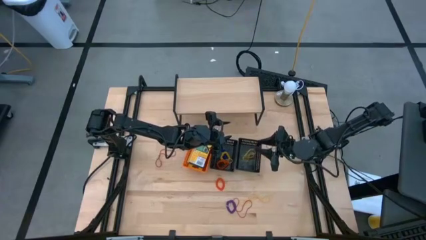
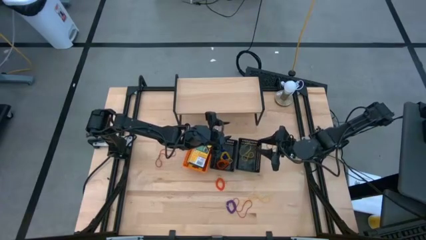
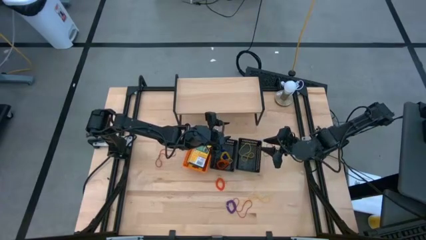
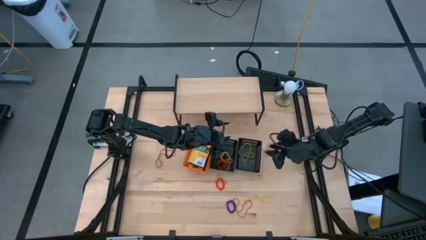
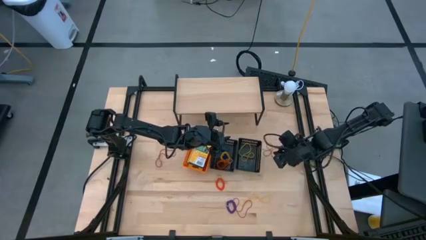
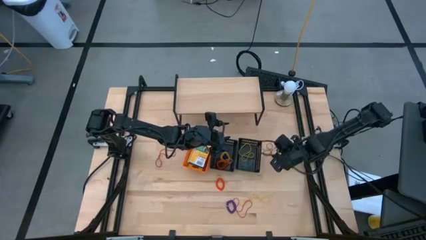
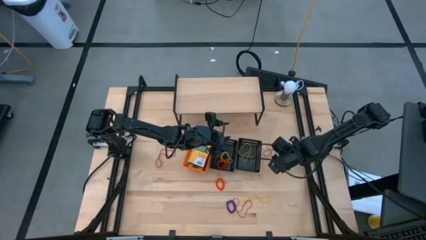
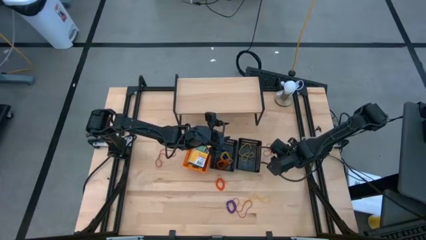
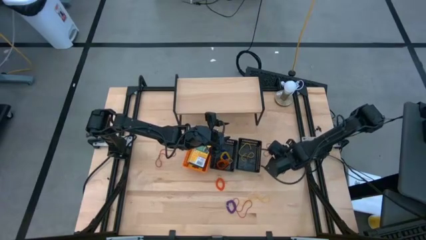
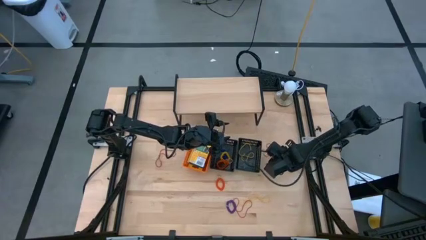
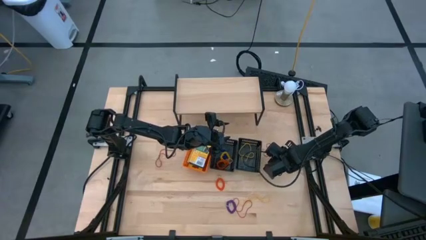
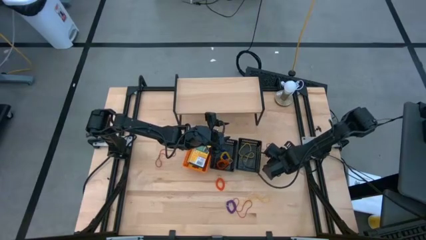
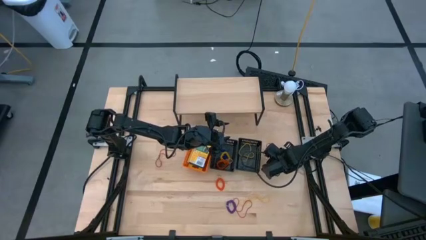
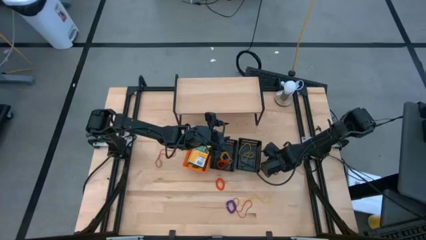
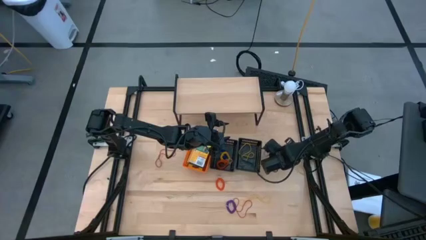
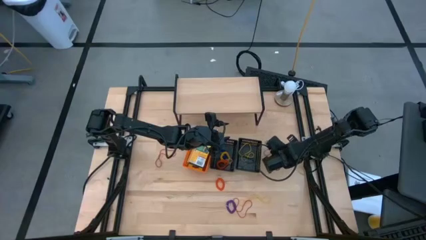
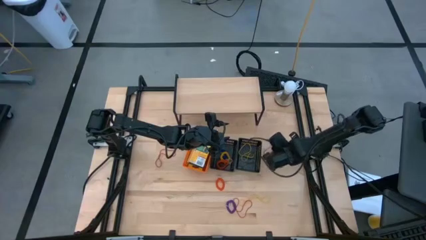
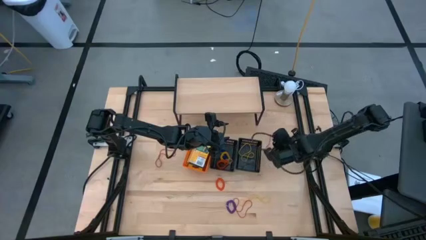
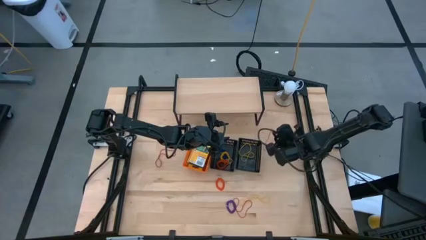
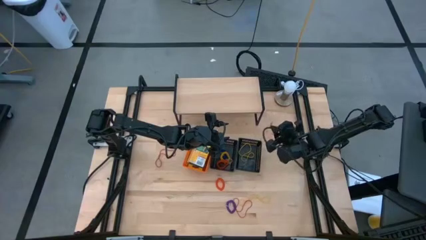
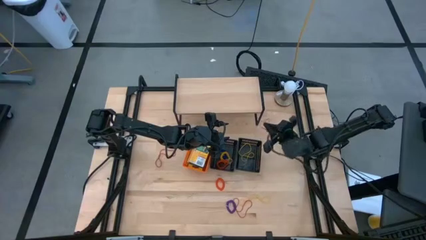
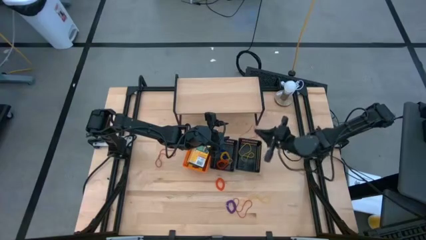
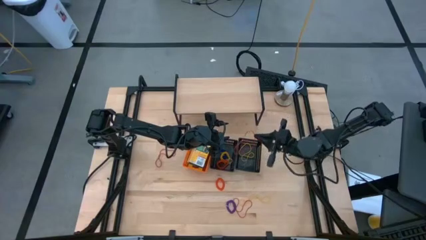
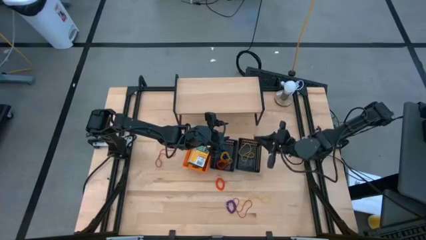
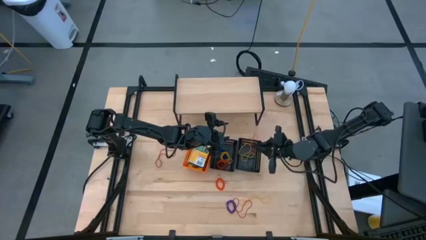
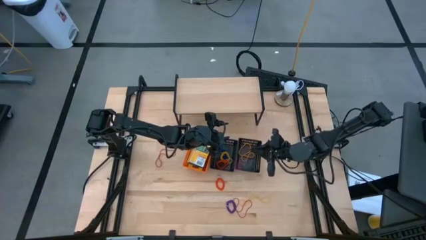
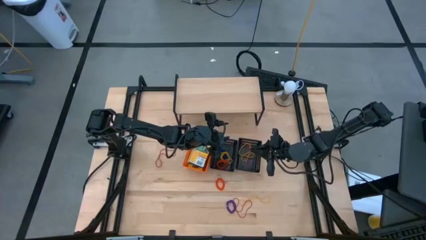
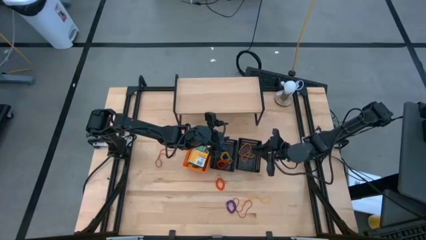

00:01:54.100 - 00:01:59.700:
Task: Pick & Place Office Desk Supplies
Put the red rubber band into the right black bin

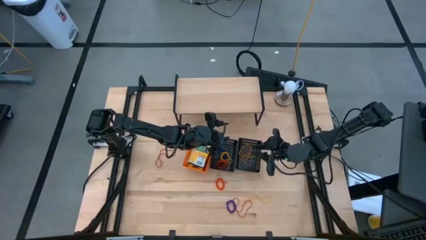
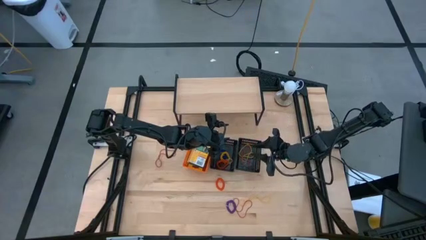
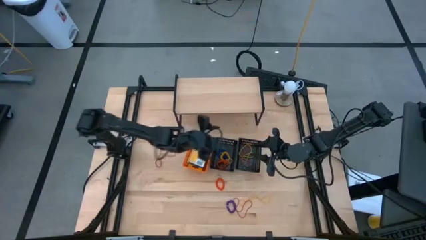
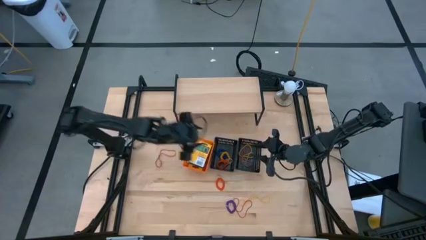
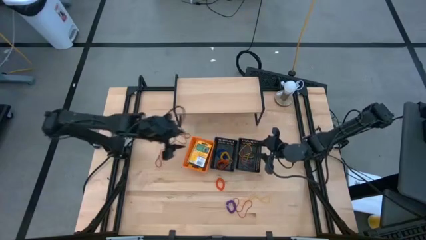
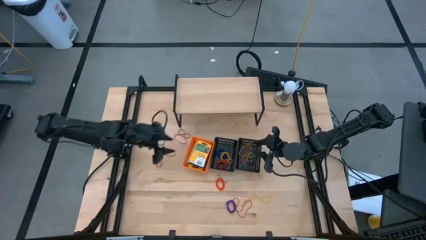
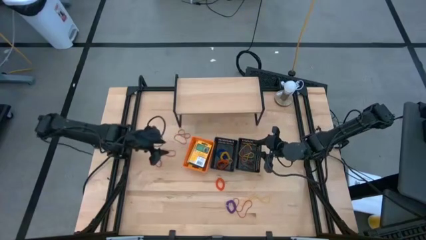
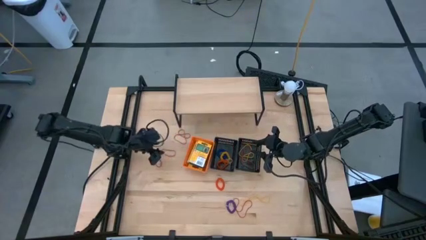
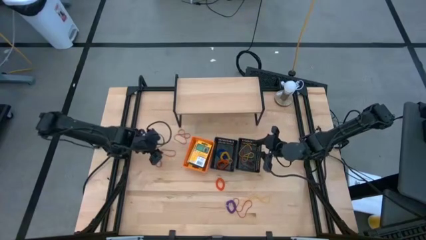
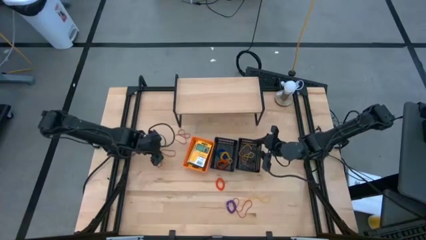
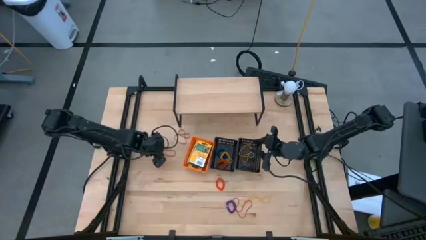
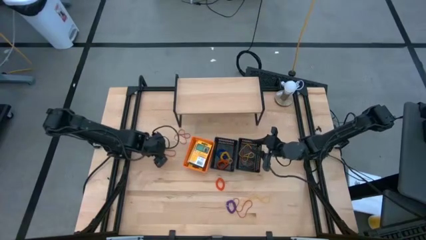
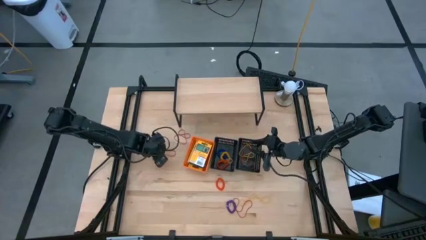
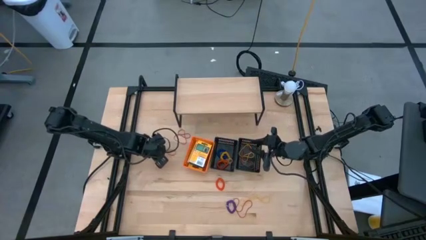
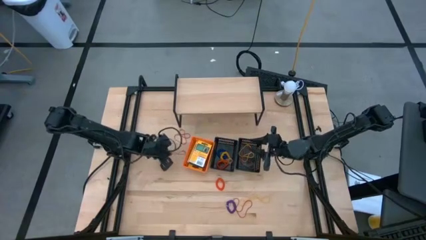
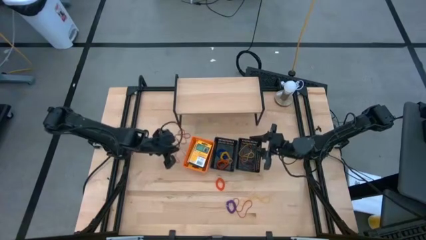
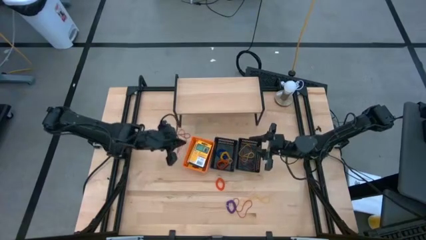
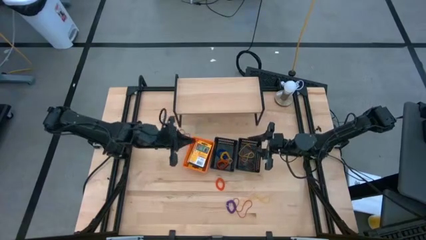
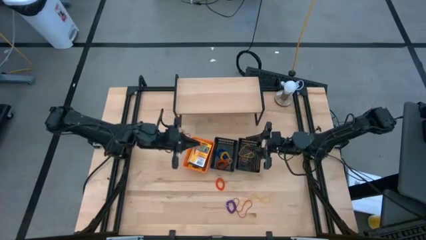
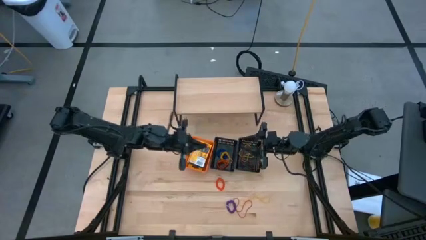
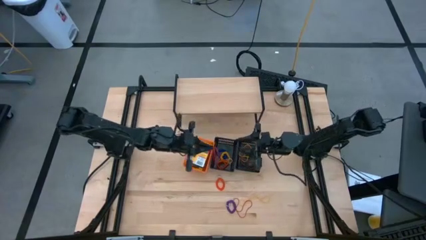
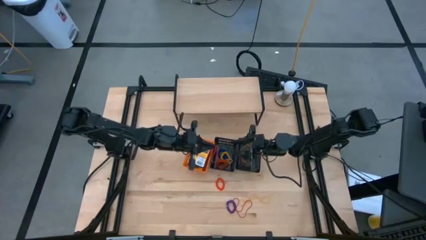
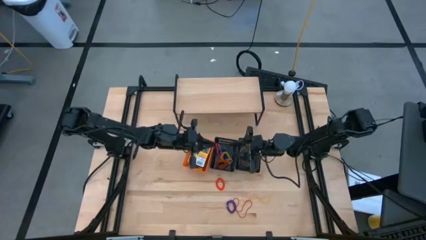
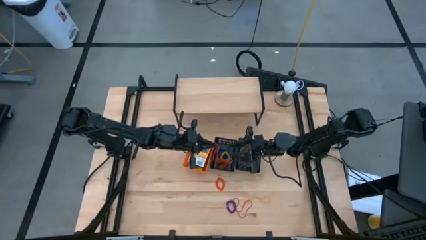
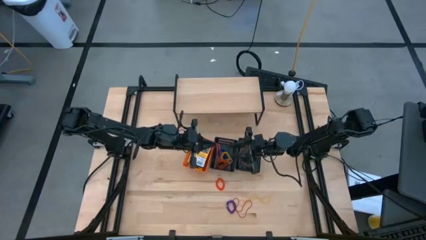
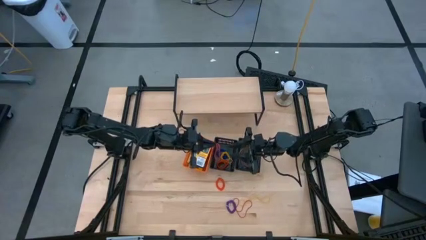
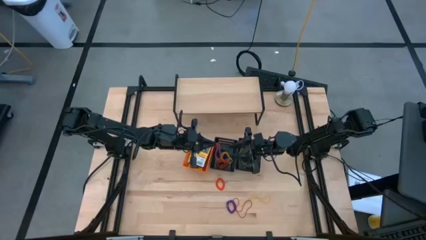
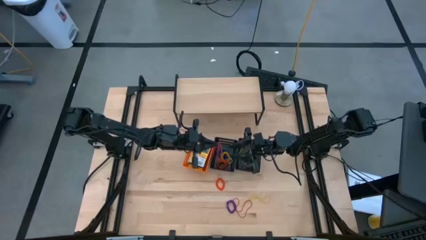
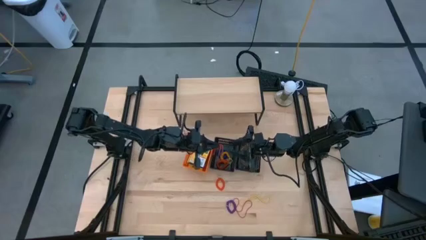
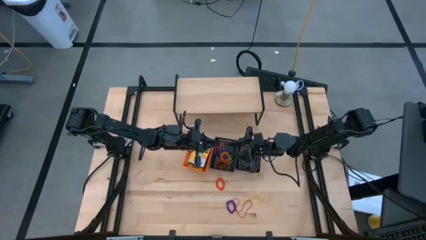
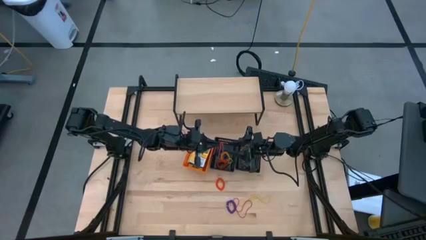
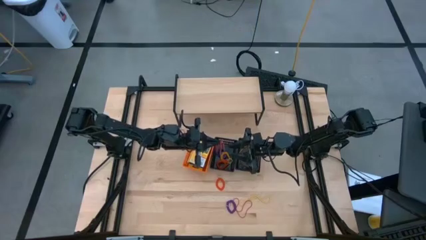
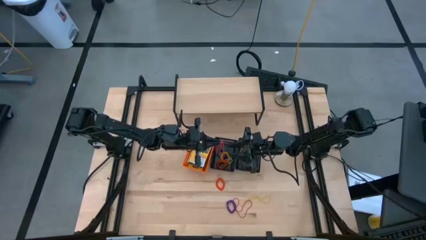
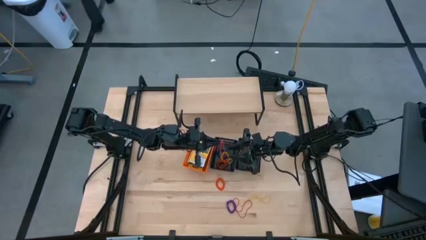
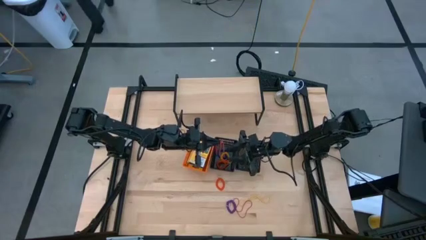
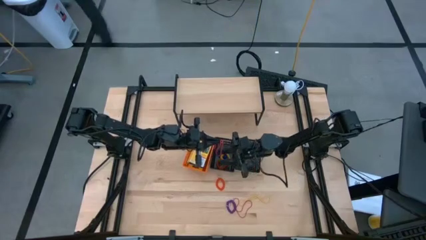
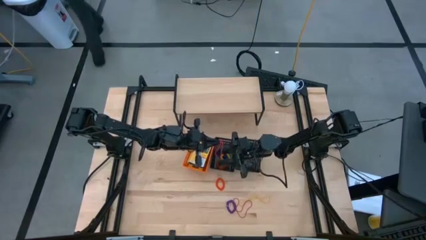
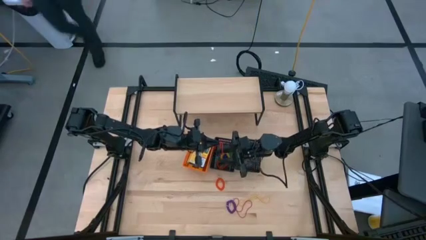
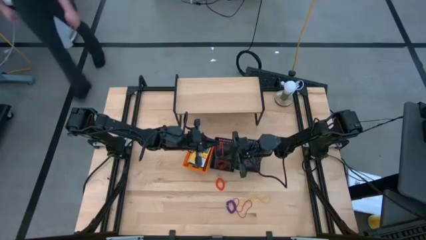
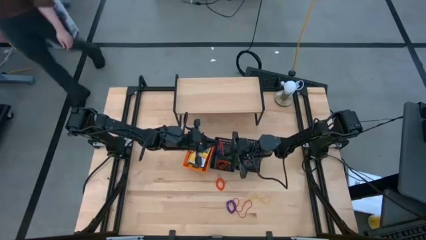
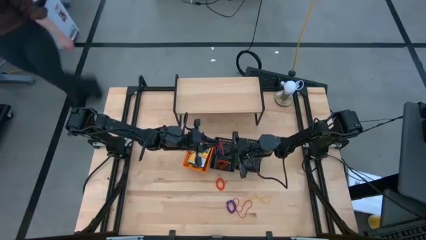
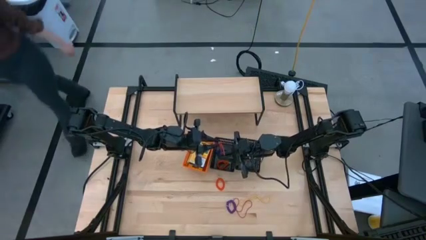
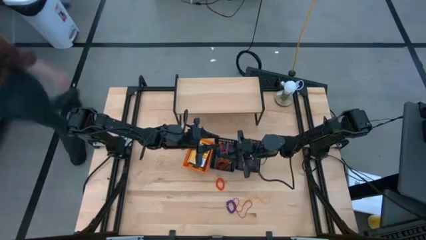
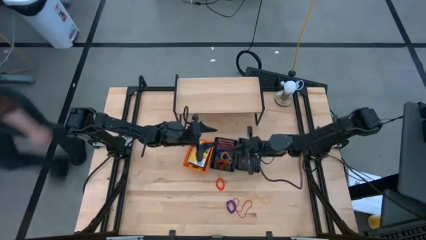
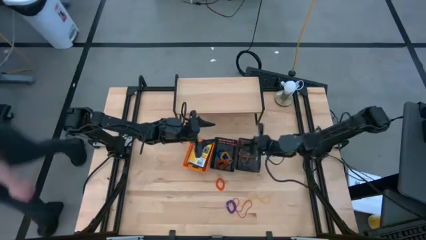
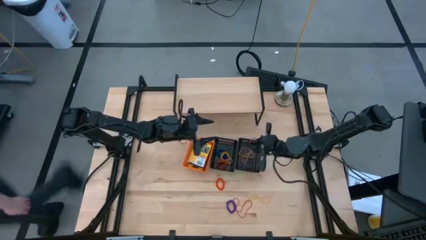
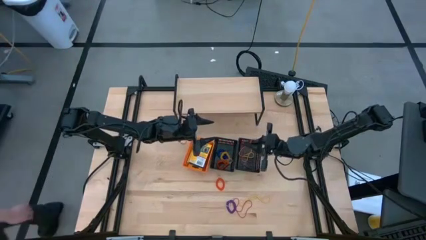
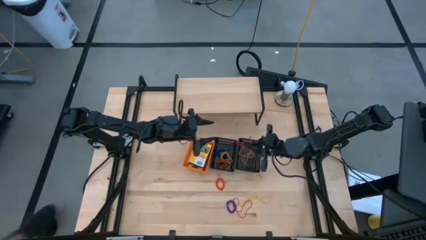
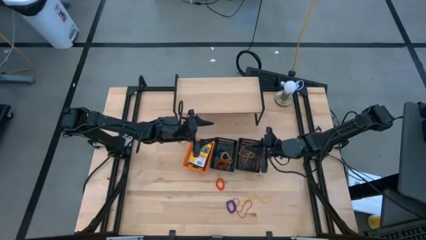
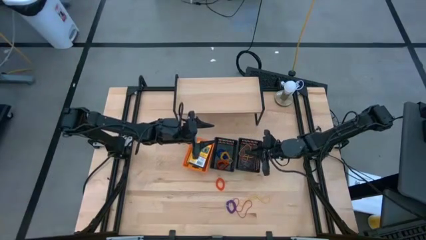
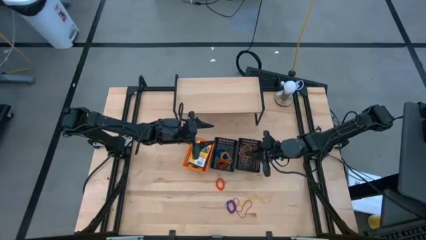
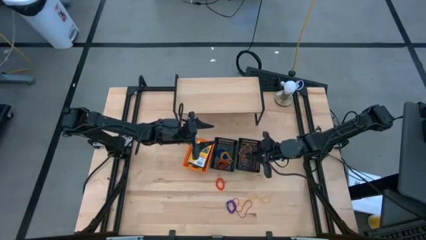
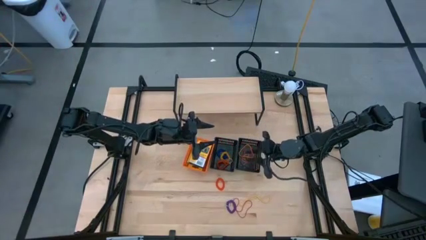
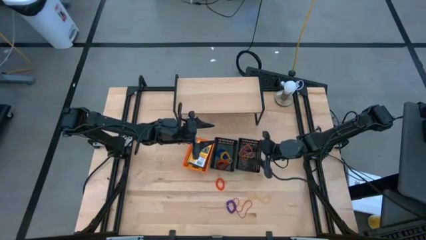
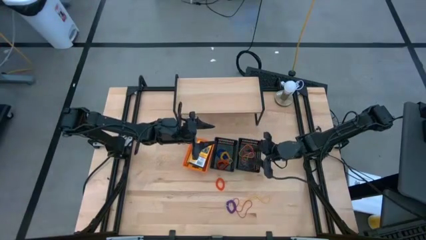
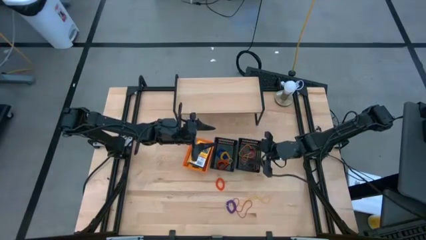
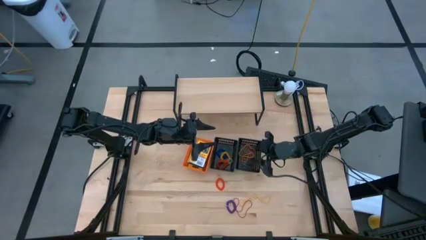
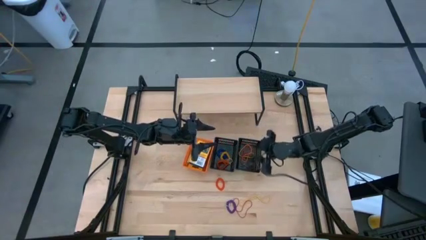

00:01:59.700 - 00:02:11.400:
Put the red rubber band into the right black bin
